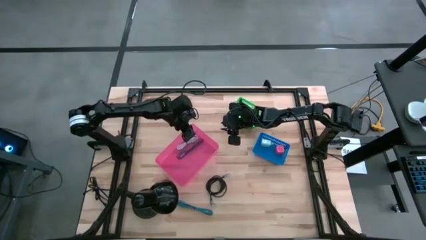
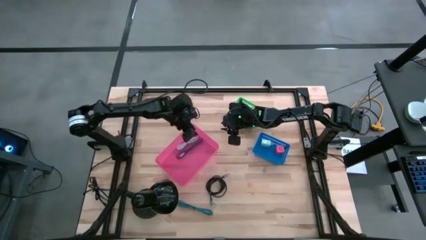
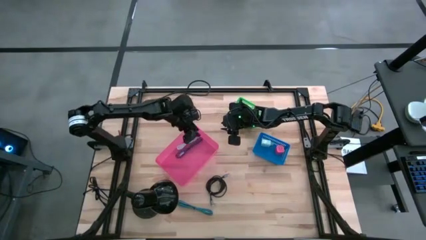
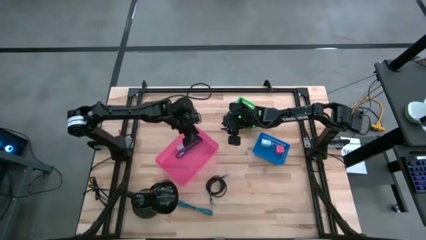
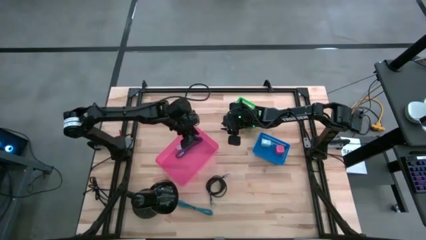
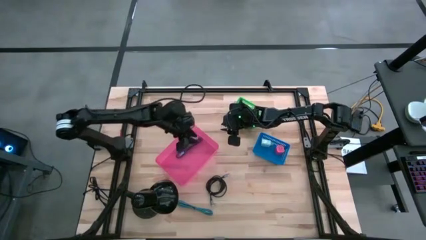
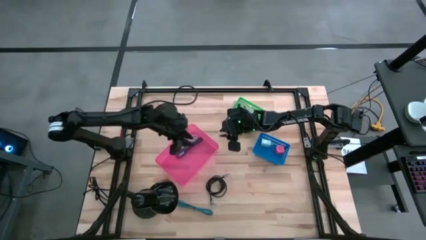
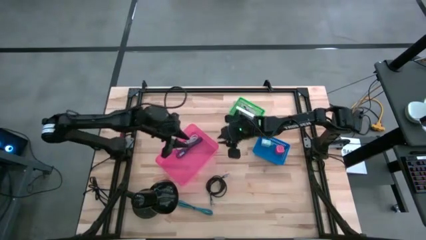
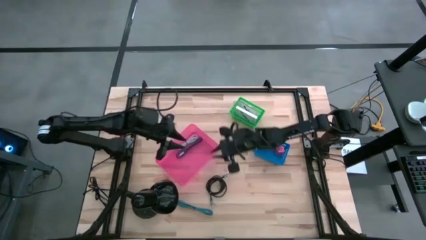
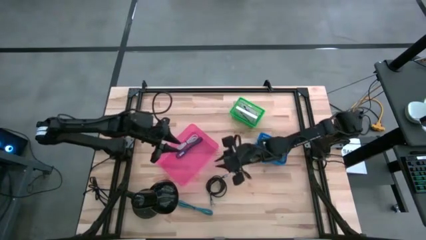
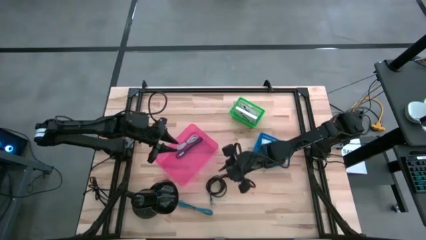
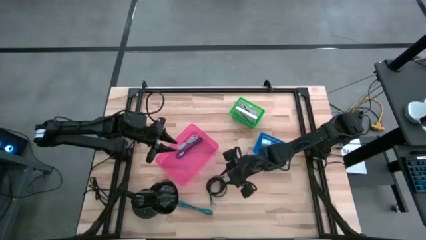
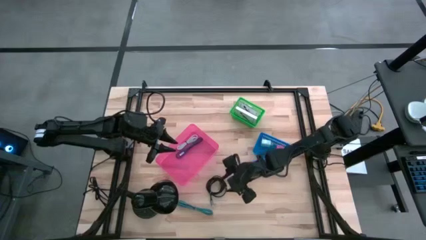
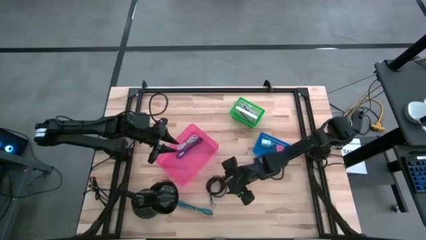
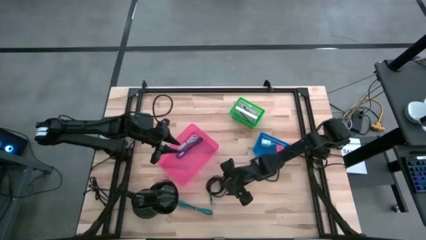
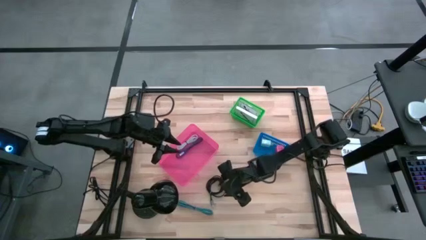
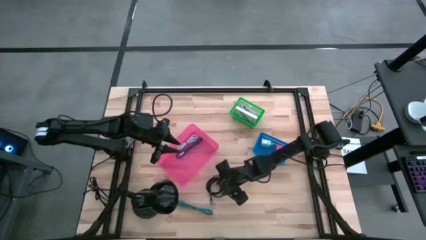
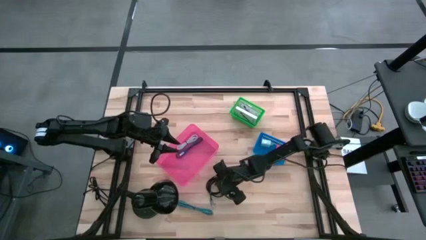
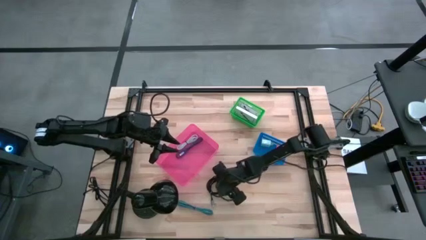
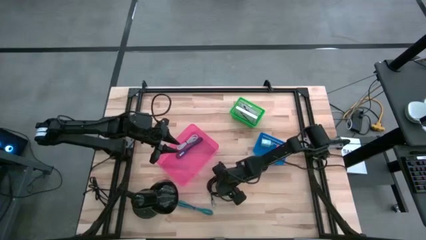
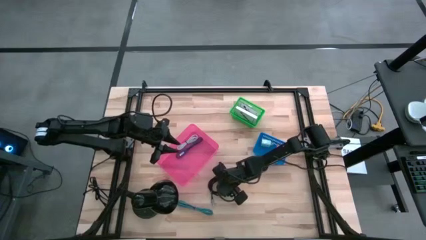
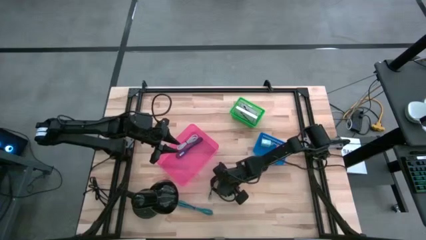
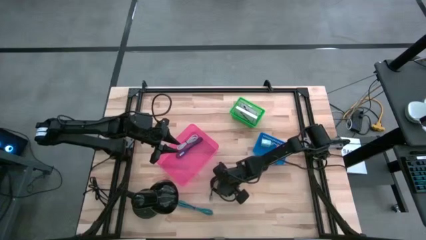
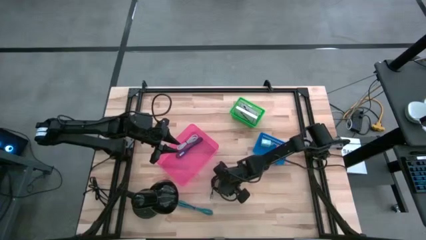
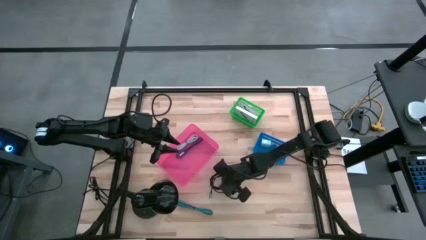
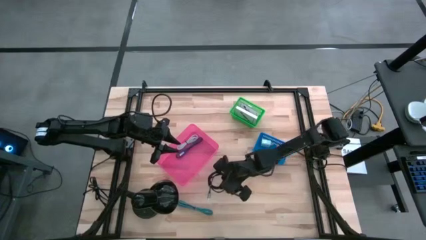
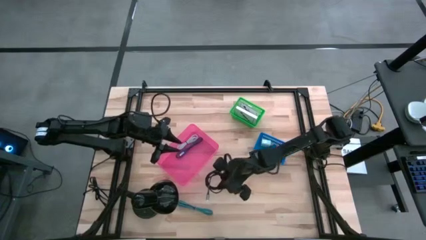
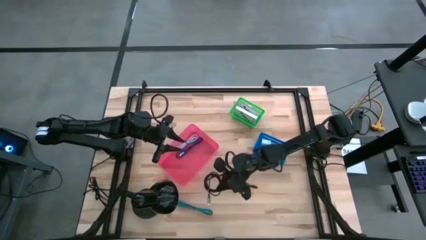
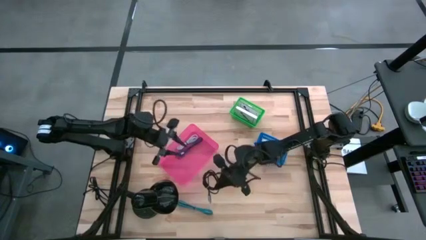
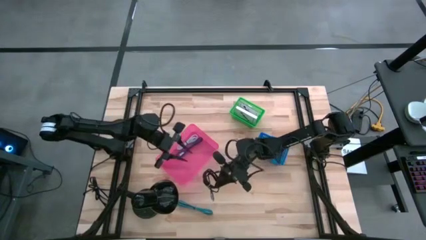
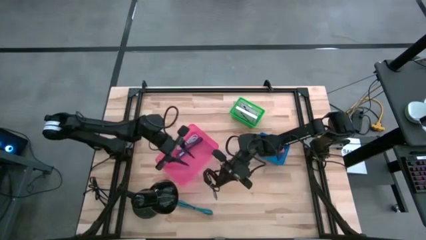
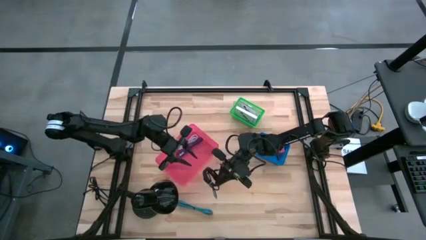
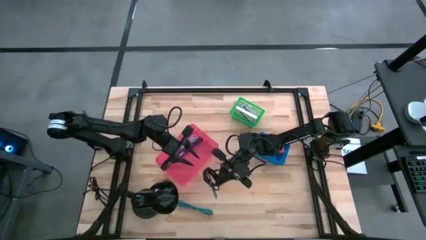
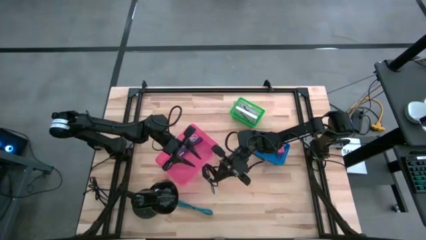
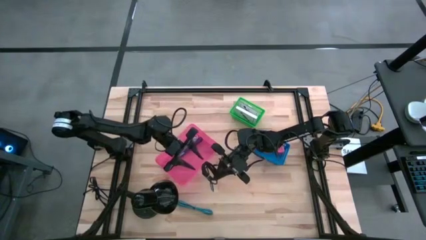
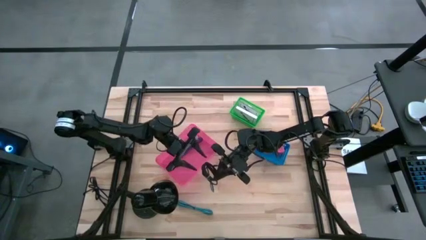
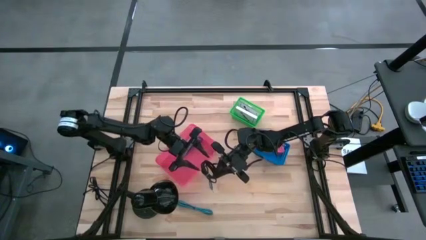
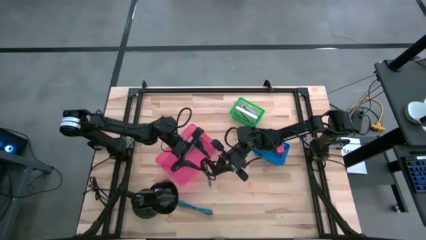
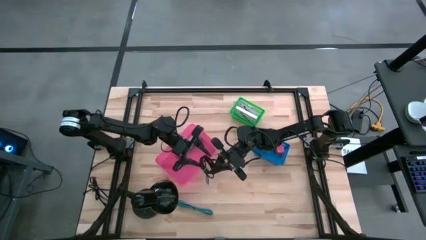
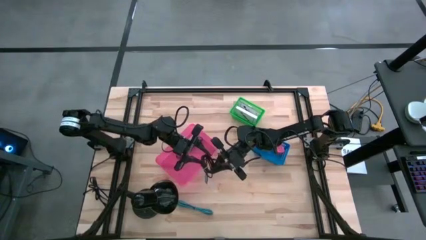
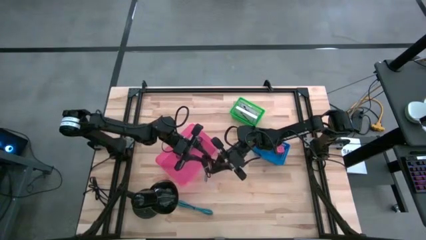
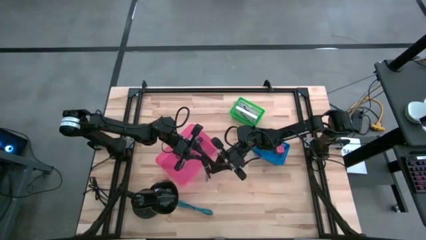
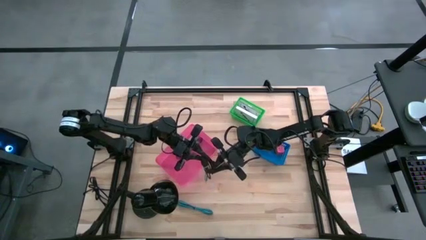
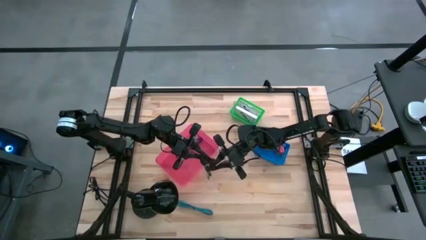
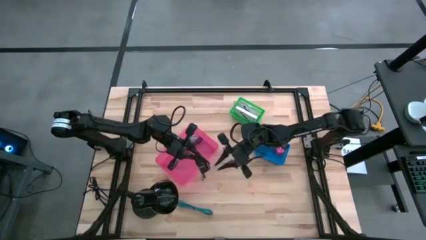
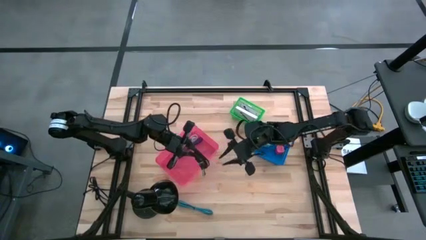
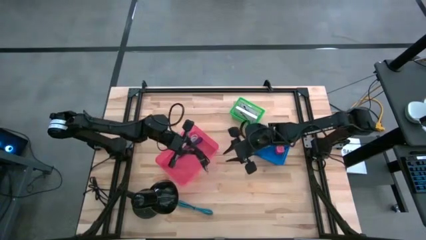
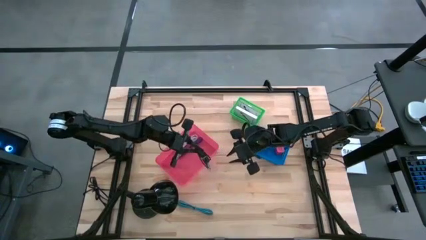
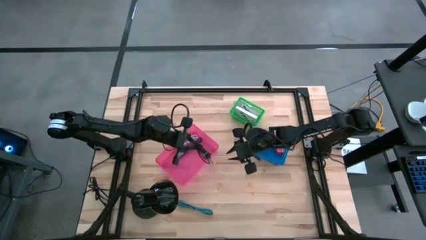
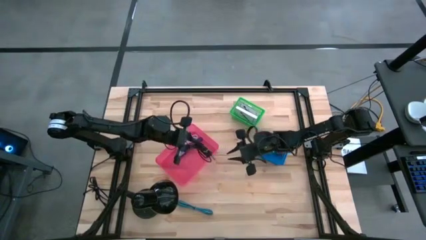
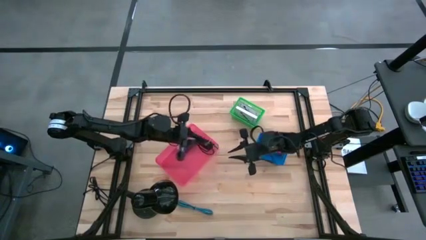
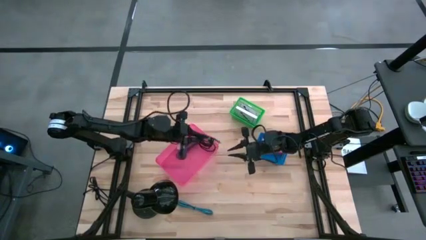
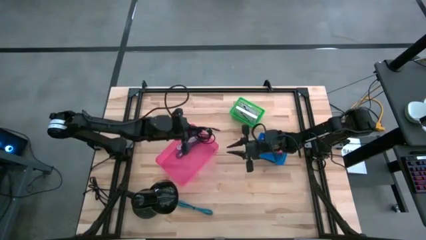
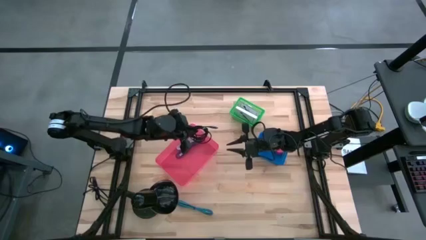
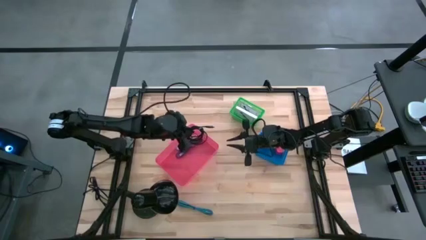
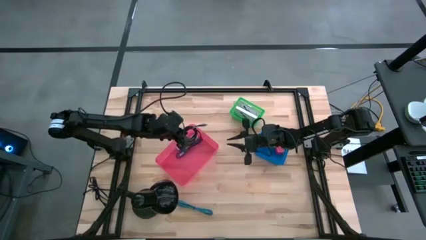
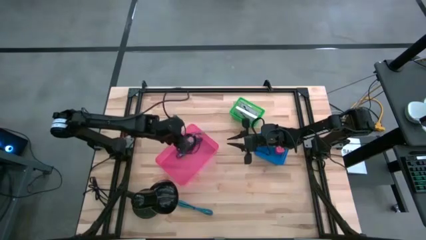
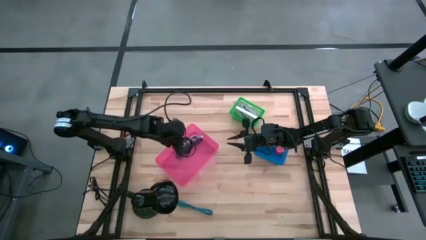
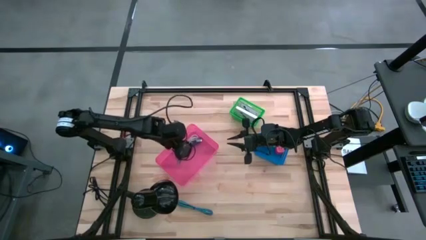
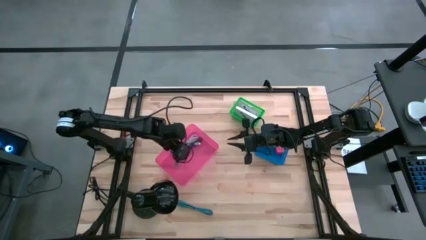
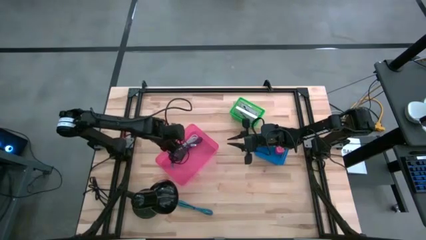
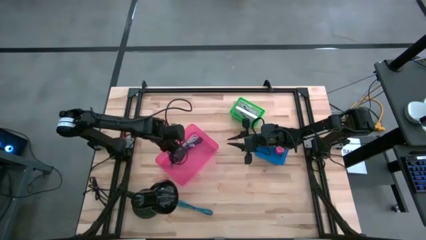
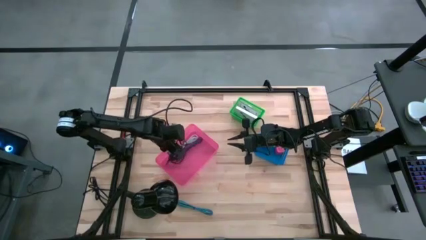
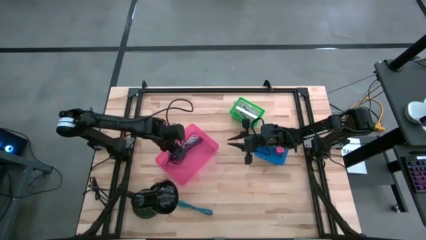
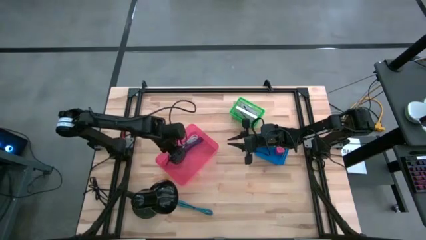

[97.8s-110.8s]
Task: Pick and place items into bin
Put the black charger cable into the pink bin

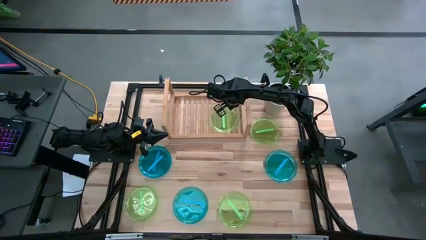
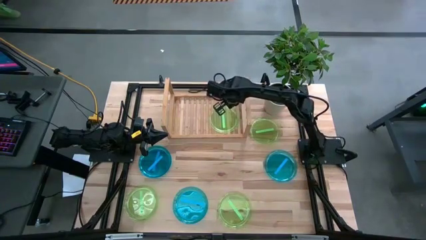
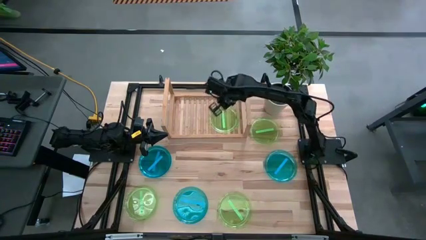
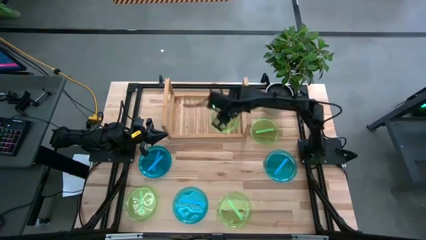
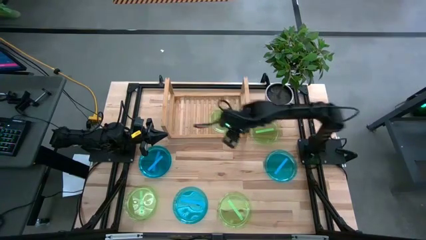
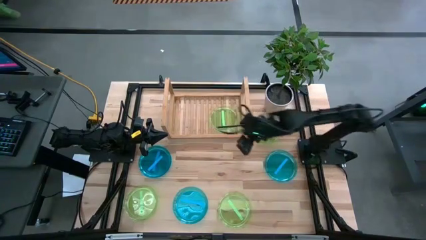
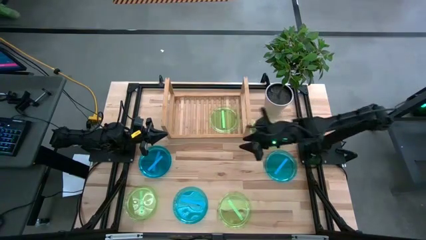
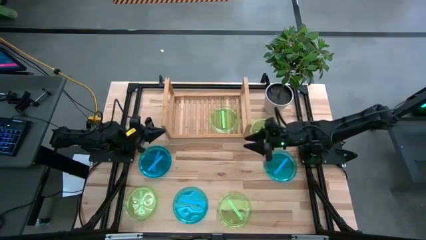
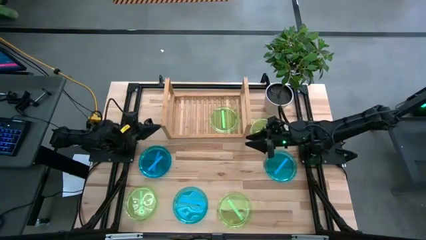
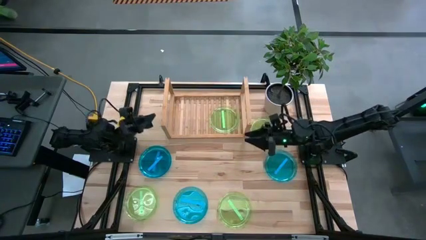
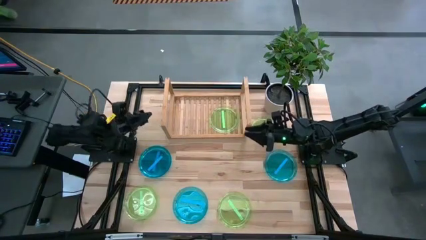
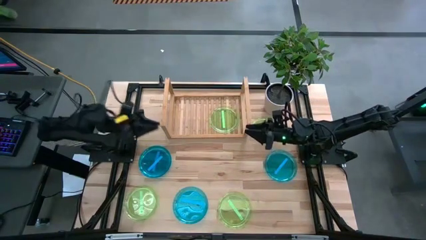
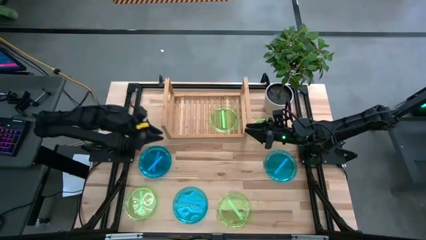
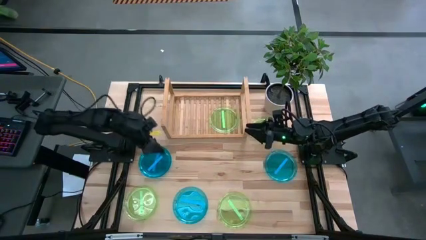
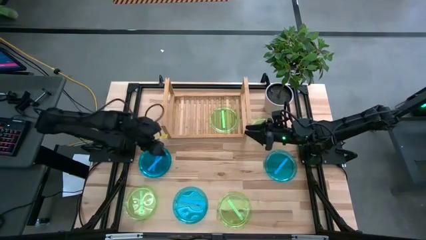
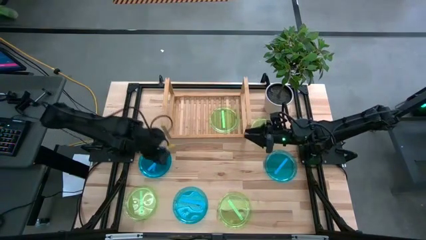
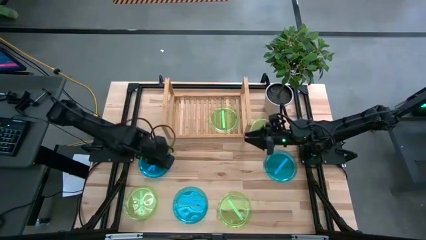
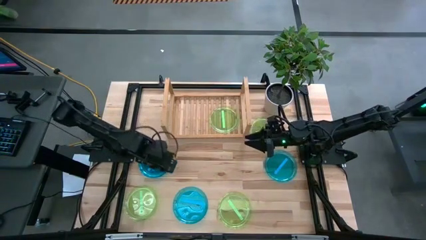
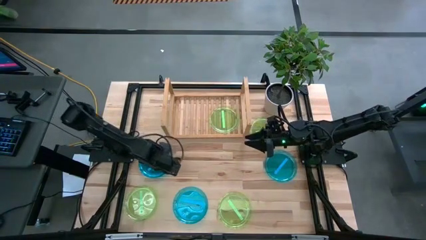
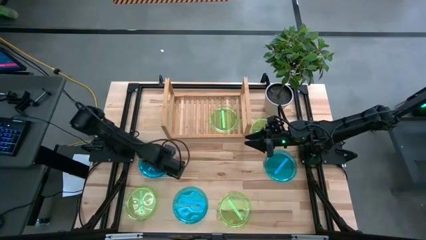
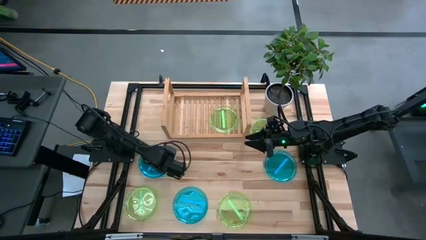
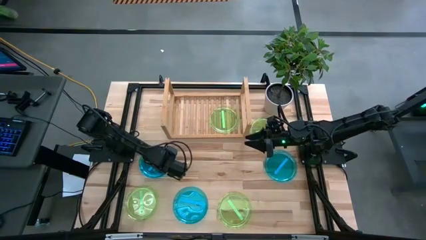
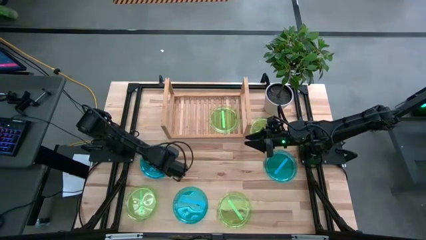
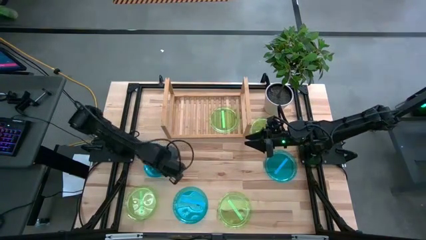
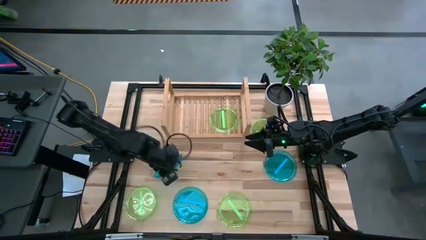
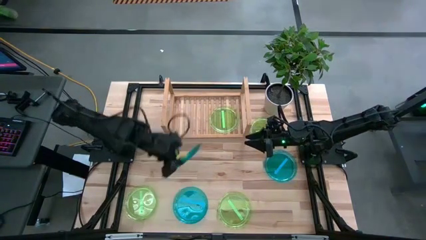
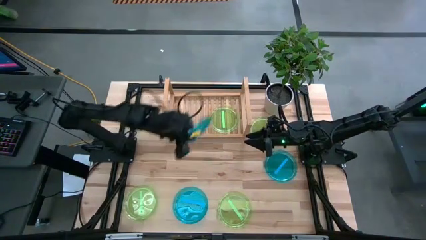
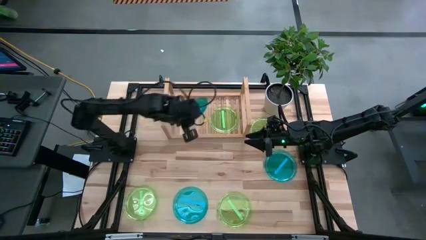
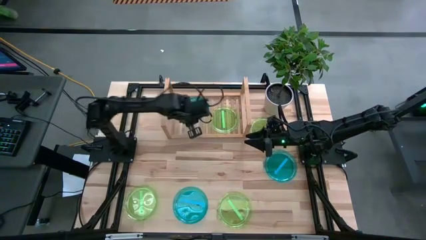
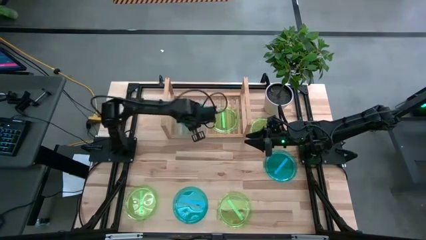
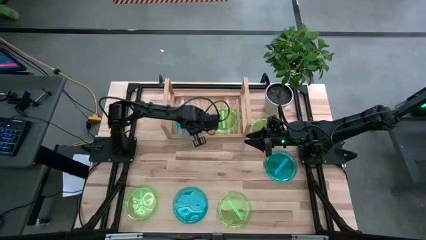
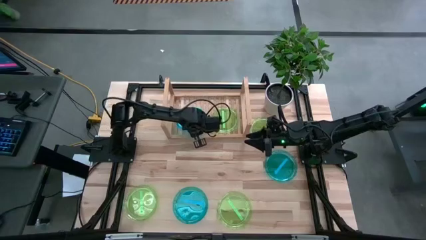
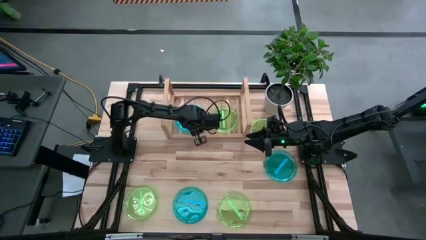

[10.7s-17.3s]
Task: Place and stack plates onto a shelf
Put the top left transparent blue plate on the shelf
